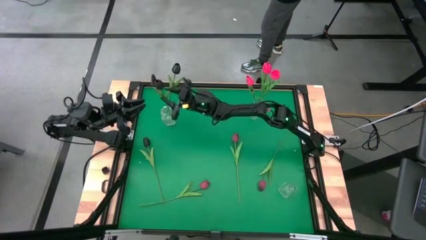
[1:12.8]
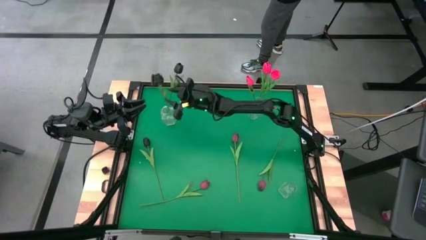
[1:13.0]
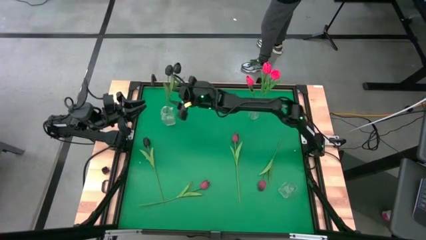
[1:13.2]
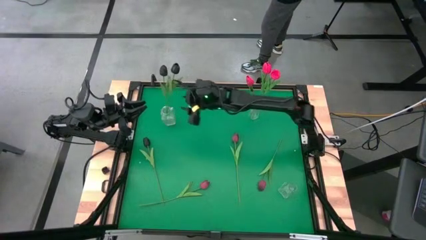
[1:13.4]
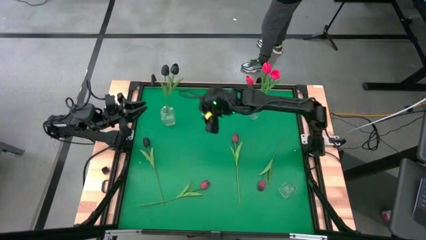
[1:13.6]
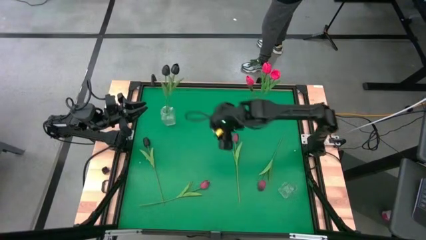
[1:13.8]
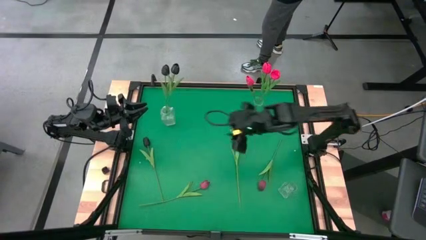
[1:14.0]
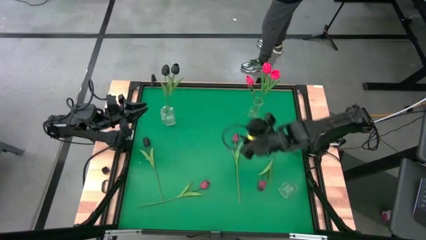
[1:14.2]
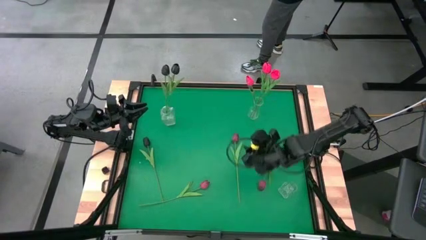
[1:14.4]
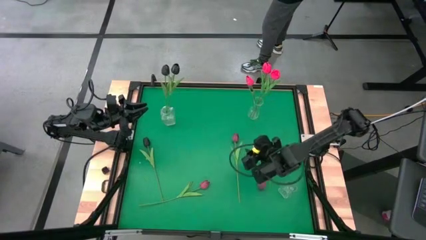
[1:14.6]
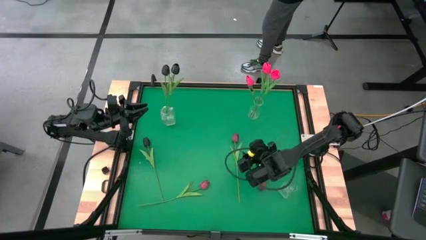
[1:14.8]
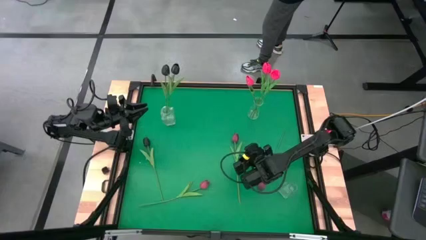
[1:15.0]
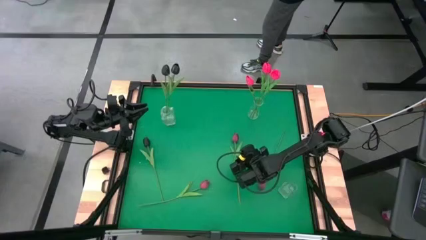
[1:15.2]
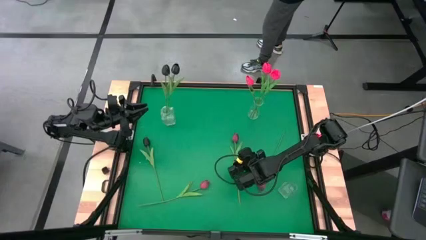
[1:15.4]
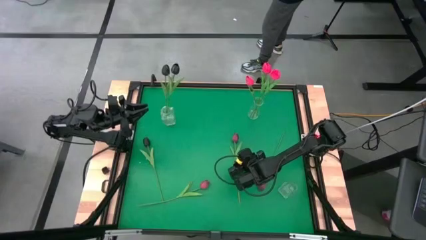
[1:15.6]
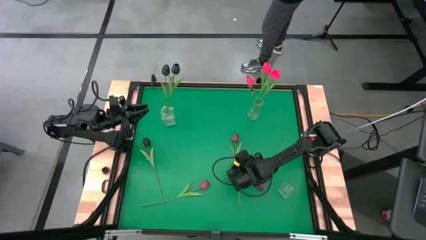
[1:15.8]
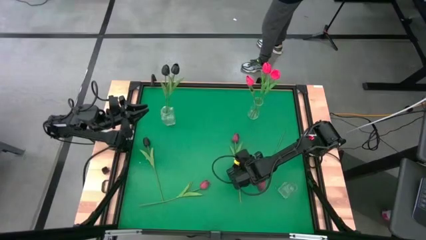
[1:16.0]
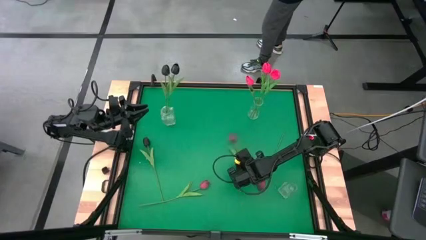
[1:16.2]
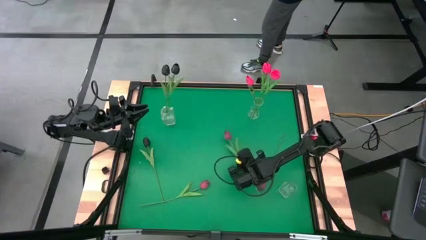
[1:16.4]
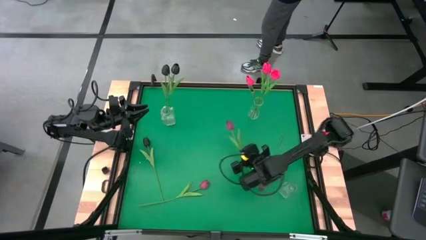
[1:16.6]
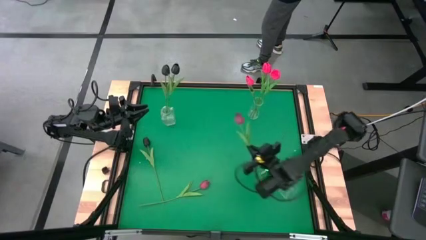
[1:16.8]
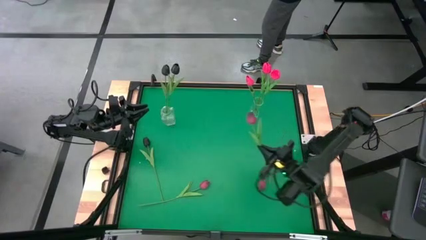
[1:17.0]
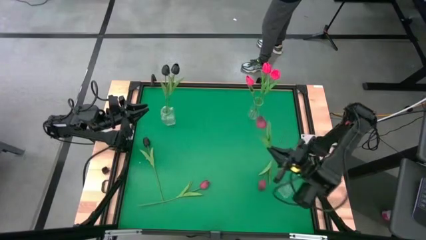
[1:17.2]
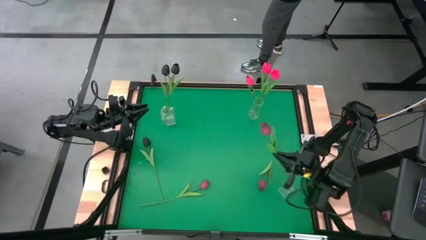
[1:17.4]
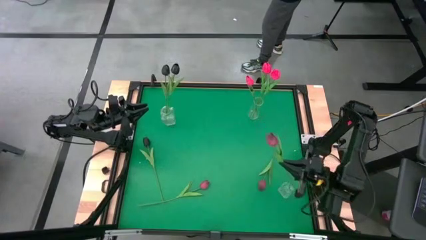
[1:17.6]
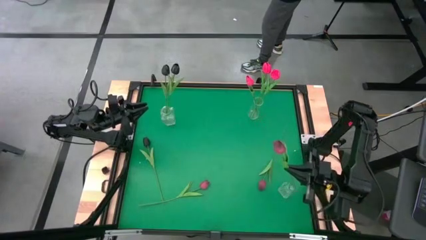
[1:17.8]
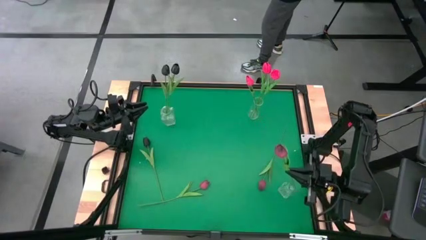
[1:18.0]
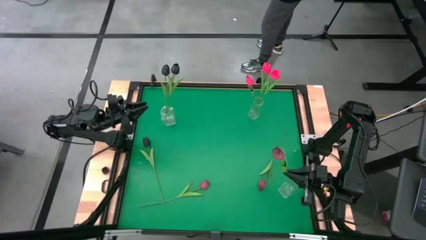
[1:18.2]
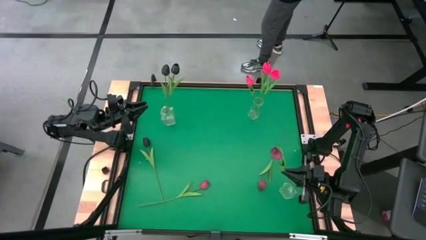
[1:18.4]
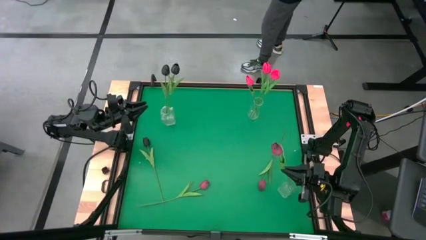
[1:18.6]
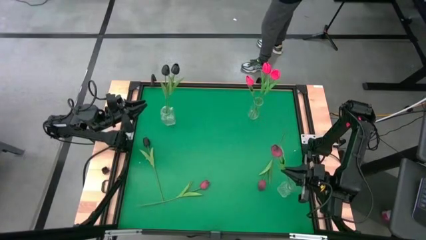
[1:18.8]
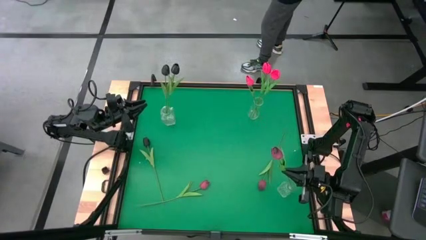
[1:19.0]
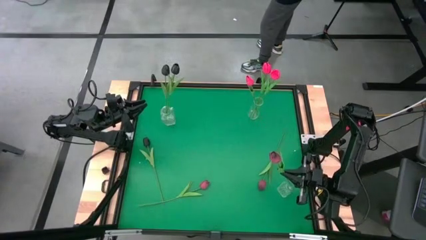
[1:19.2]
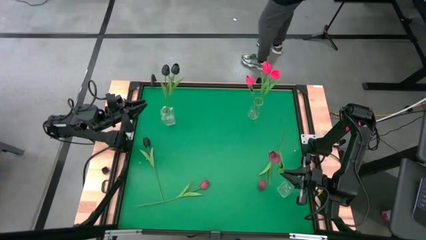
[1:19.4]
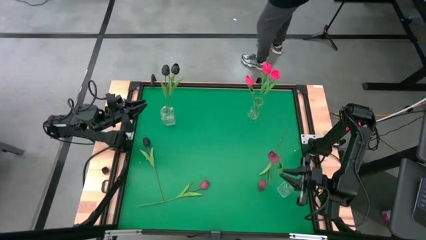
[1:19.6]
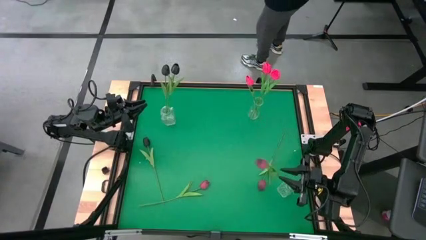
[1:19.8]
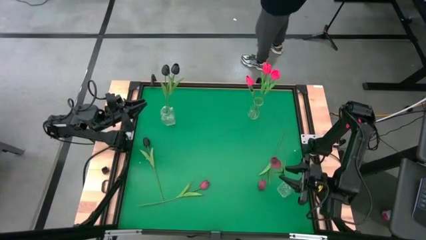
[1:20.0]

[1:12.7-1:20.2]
Task: Sort flowers into vase by color
Put the middle red flower into the bottom transparent vase

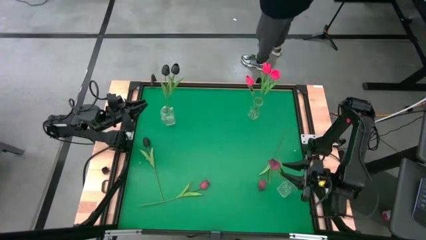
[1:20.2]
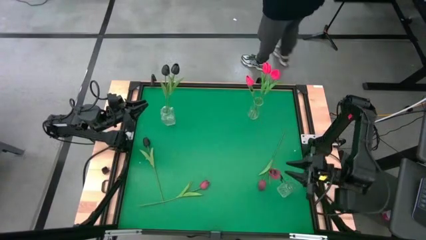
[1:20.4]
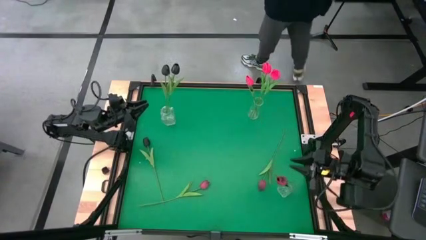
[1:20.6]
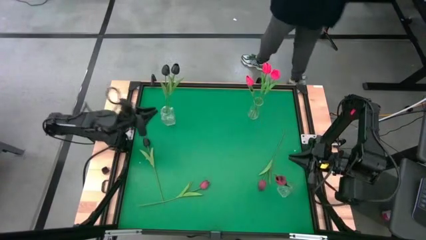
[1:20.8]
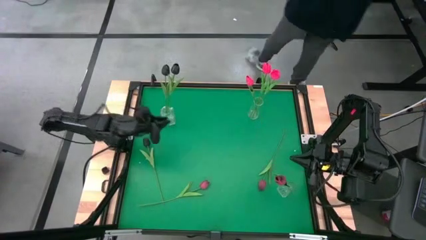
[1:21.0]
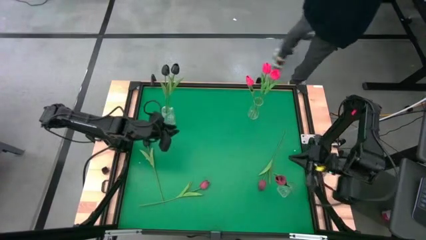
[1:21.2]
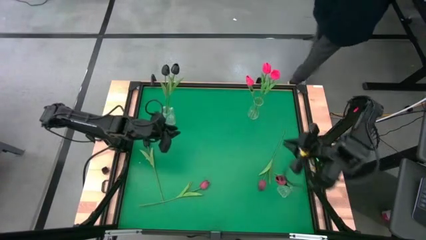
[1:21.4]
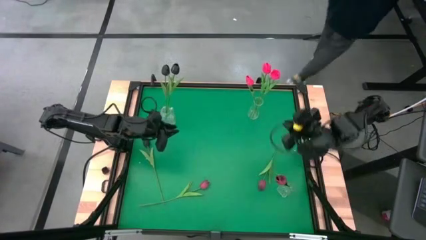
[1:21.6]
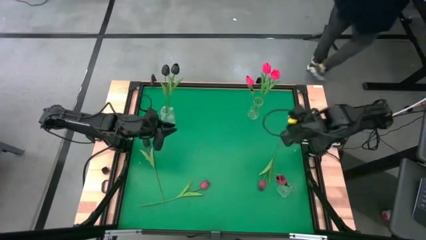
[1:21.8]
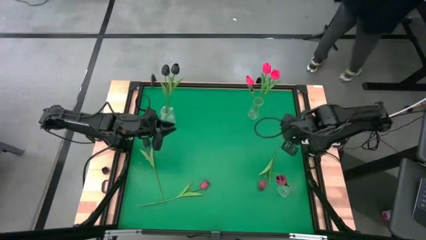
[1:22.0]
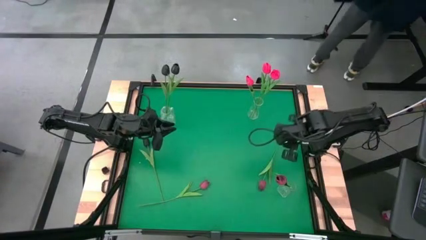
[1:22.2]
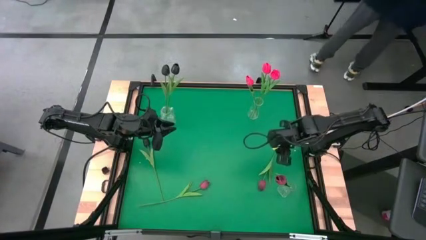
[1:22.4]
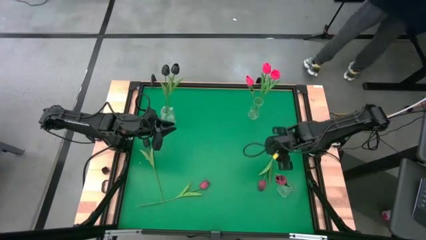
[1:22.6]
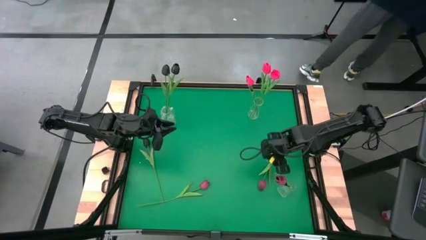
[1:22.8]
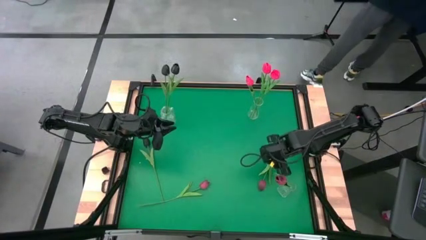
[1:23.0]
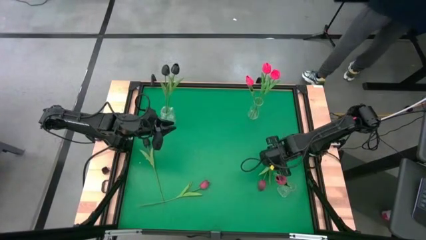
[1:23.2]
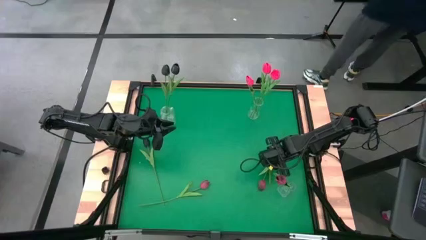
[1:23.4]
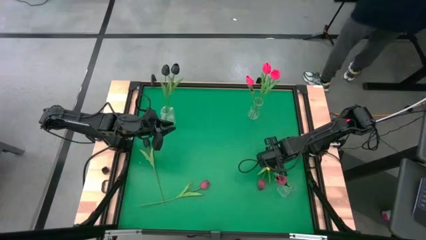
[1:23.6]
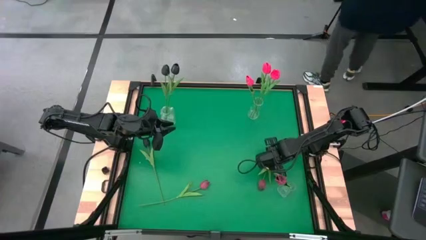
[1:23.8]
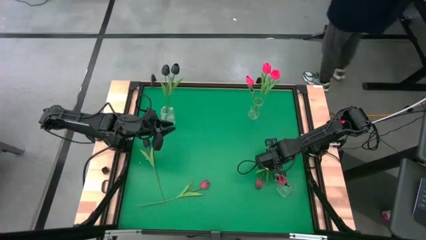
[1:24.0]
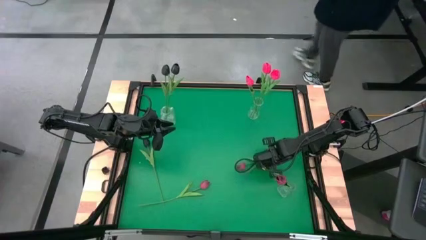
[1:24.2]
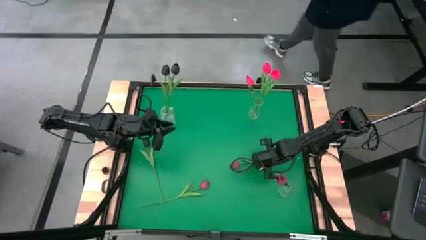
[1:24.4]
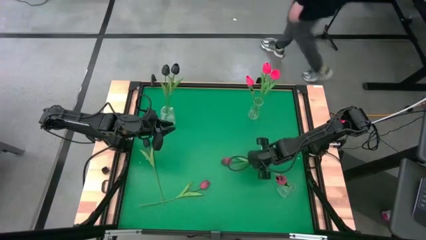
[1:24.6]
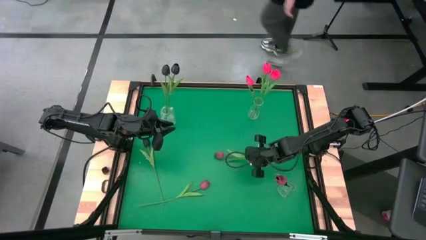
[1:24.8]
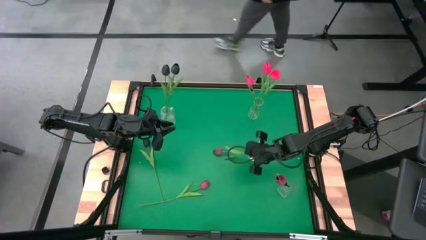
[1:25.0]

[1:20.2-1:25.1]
Put the right red flower into the bottom transparent vase

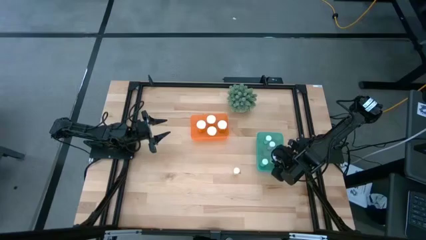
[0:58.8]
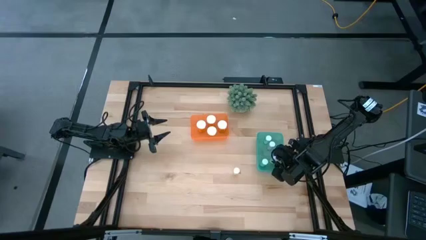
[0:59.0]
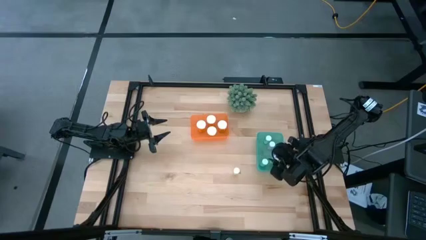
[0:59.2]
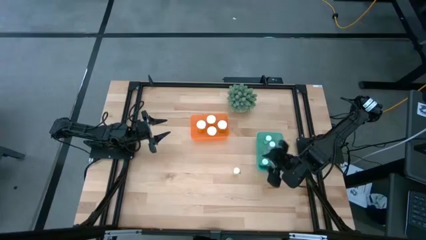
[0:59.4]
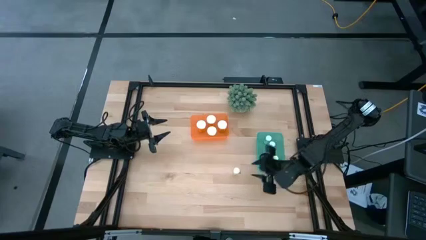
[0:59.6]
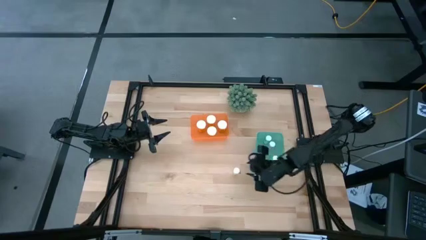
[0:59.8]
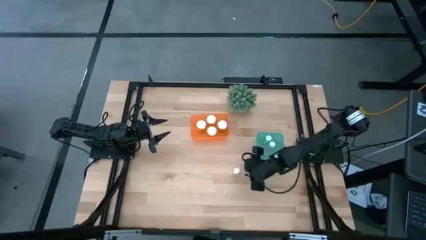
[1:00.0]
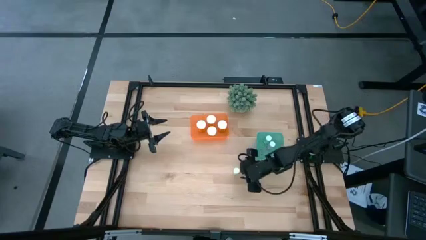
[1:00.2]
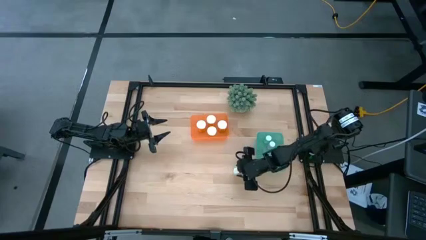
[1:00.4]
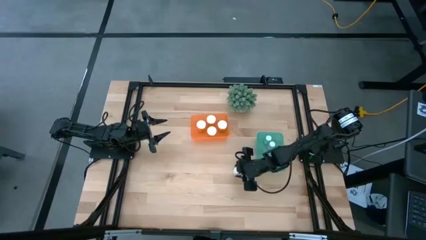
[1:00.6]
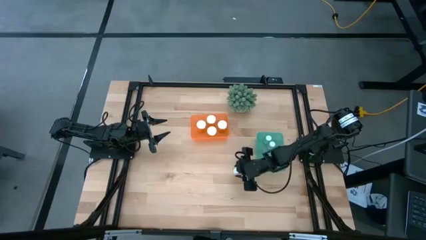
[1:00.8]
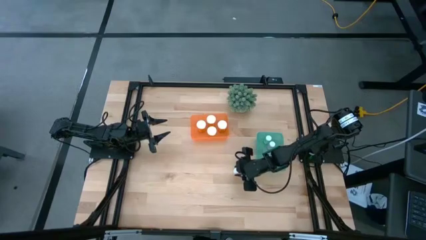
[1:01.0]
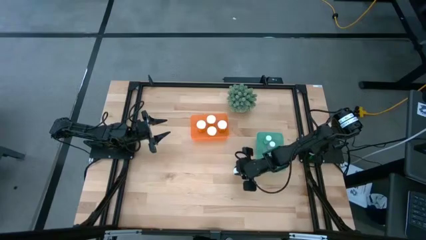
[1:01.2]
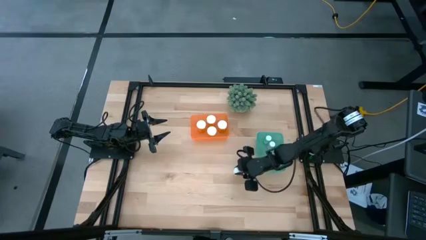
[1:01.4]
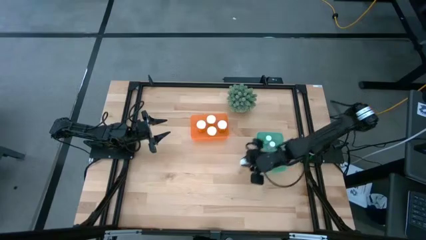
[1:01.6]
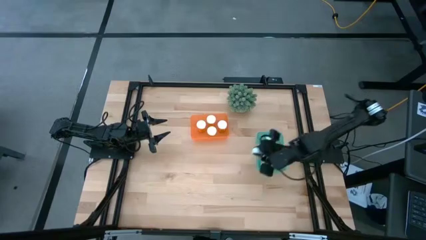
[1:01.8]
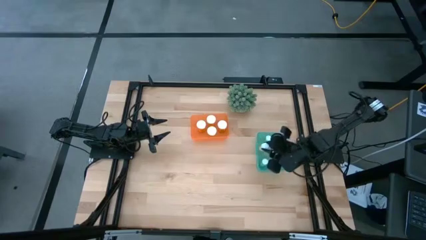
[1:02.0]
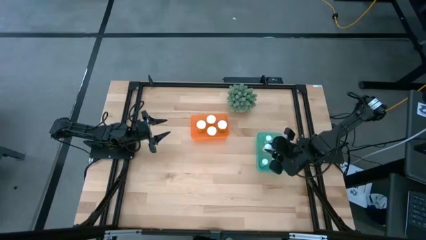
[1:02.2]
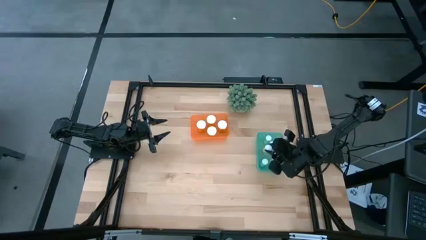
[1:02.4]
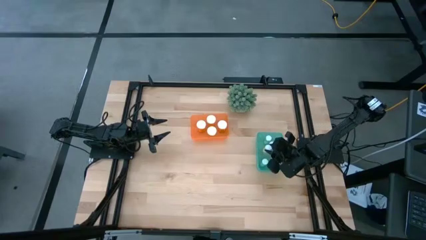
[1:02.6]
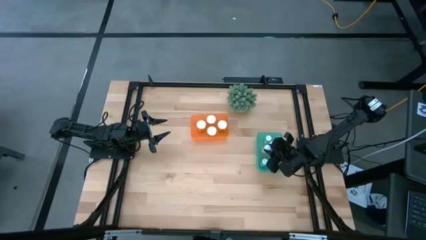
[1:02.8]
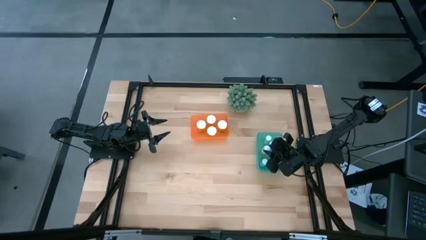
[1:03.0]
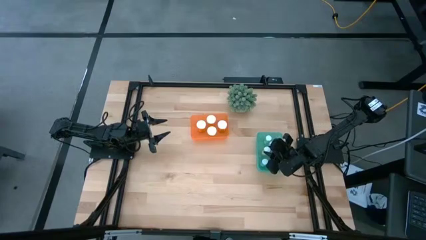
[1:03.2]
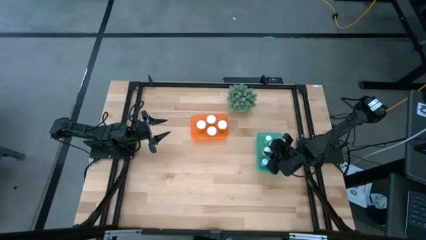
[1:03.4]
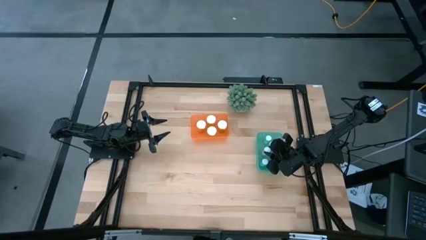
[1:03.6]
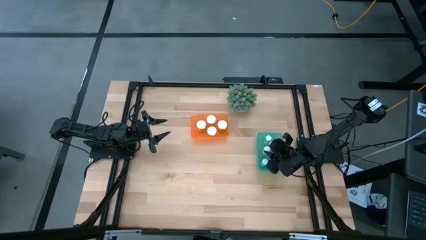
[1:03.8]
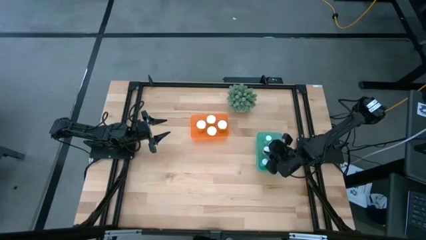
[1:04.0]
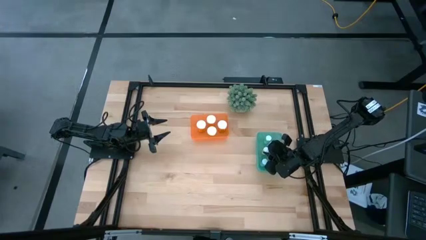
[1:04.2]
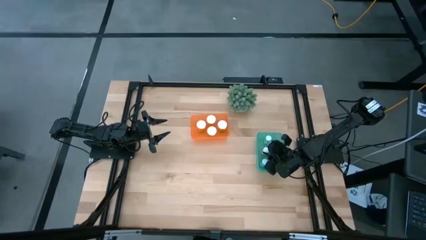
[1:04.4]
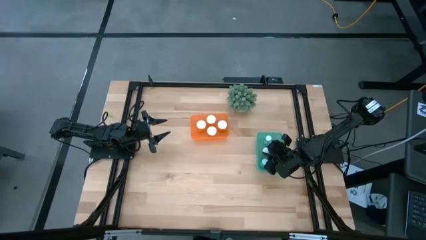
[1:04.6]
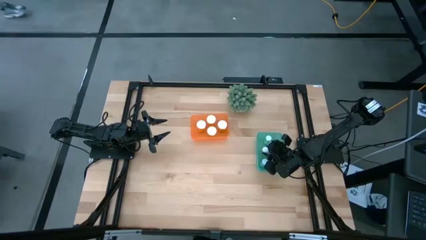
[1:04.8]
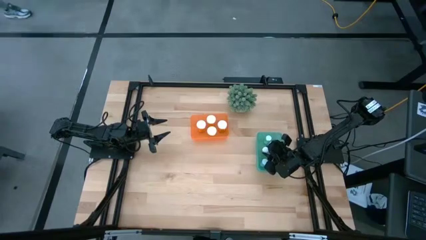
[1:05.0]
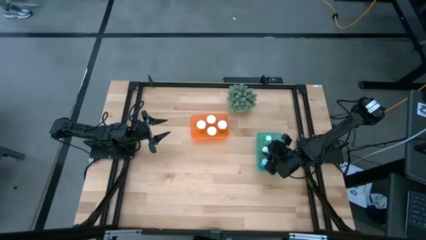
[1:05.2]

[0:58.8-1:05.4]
Task: Pick and place medicine bottles into bin by pill shape (circle, oval)
Put the yellow pill bottle into the blue bin
